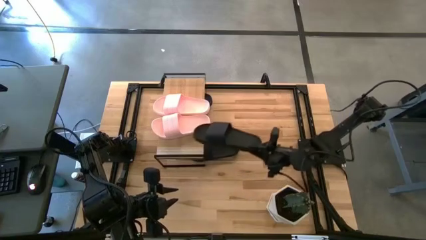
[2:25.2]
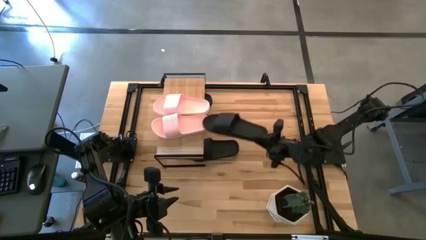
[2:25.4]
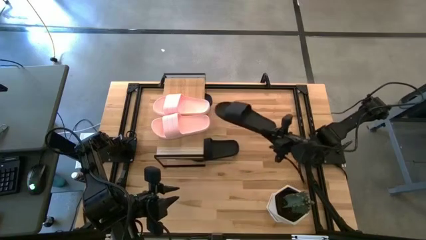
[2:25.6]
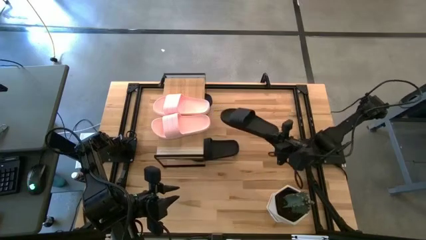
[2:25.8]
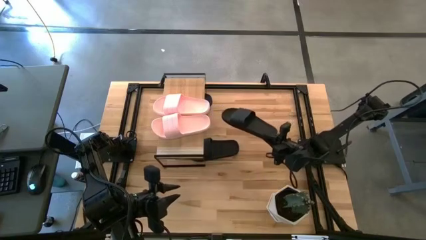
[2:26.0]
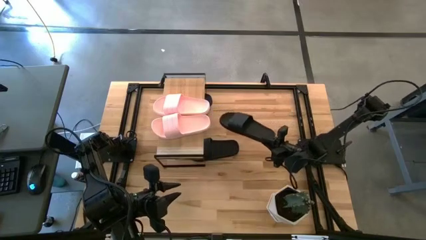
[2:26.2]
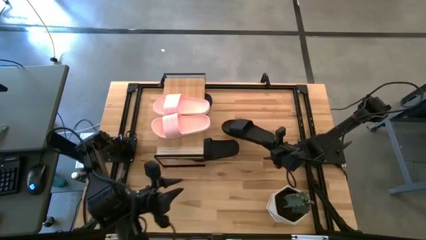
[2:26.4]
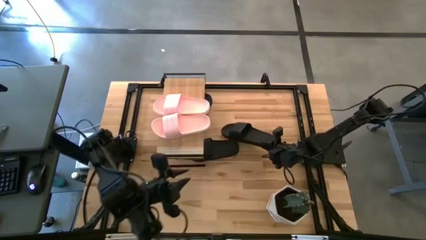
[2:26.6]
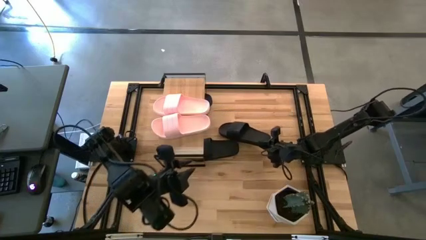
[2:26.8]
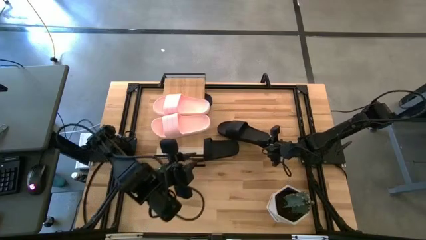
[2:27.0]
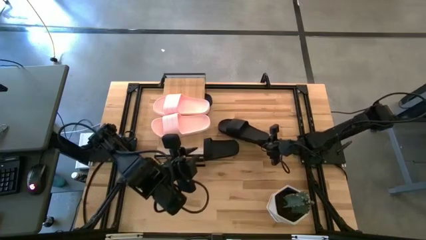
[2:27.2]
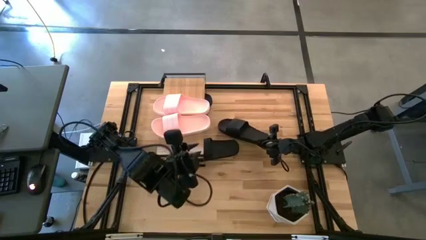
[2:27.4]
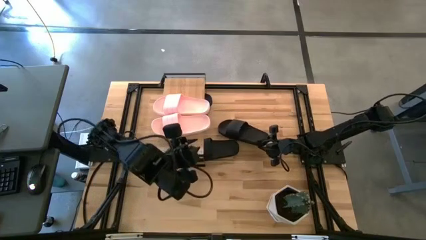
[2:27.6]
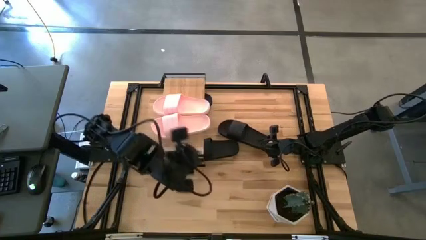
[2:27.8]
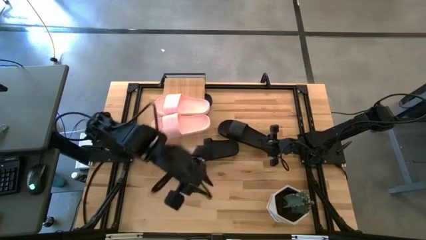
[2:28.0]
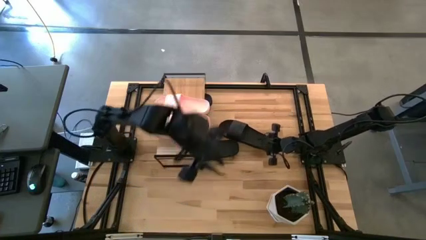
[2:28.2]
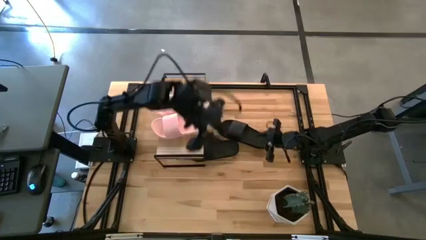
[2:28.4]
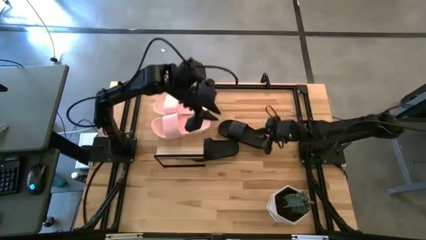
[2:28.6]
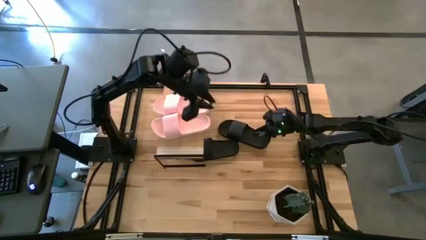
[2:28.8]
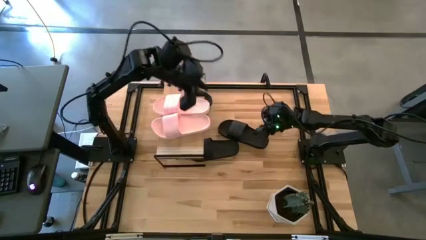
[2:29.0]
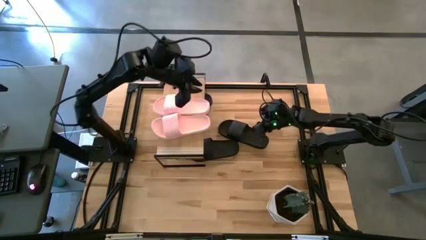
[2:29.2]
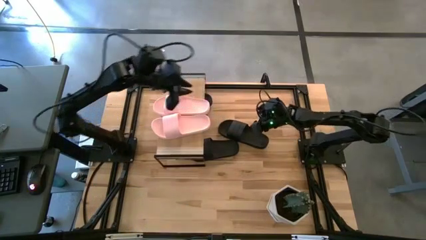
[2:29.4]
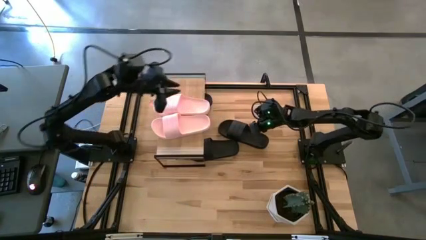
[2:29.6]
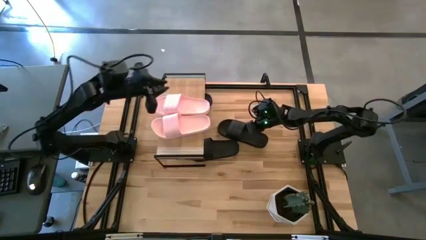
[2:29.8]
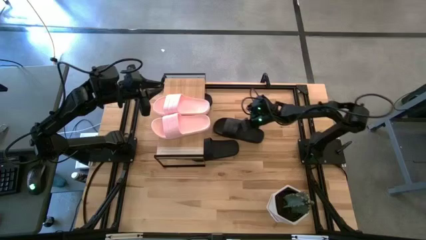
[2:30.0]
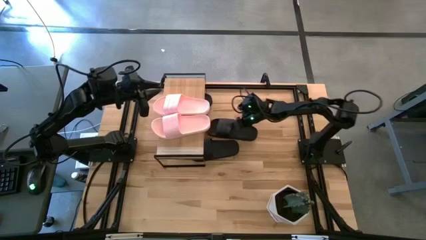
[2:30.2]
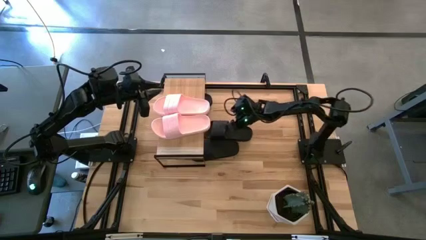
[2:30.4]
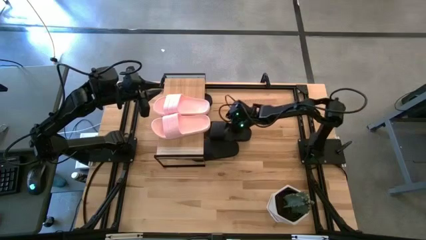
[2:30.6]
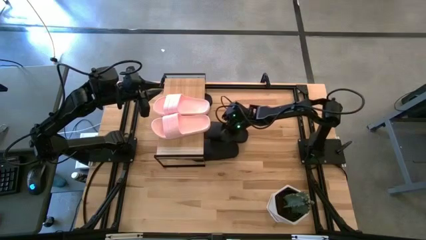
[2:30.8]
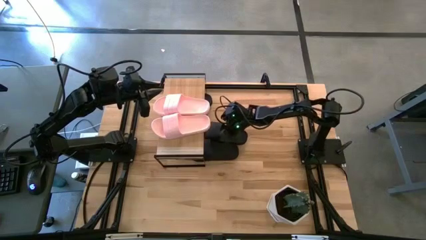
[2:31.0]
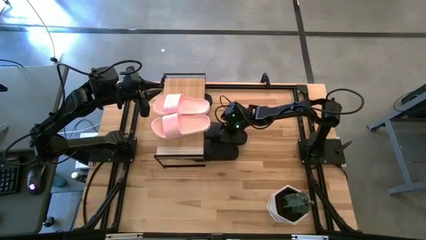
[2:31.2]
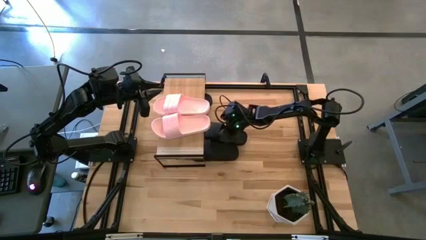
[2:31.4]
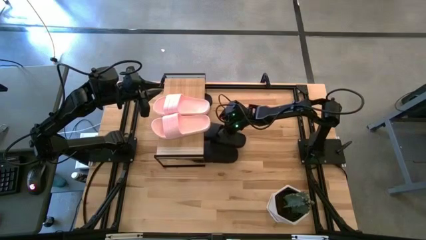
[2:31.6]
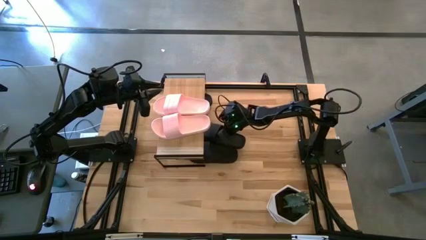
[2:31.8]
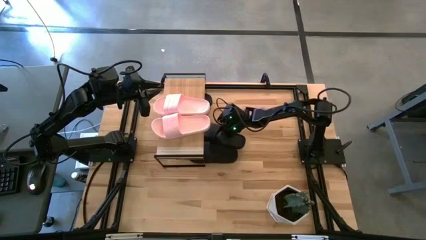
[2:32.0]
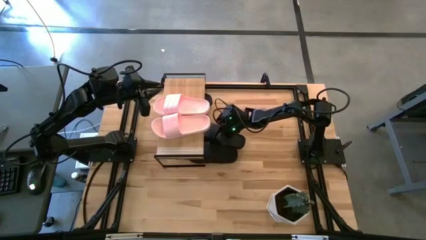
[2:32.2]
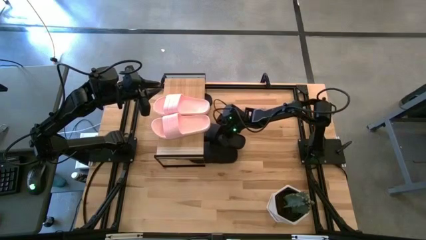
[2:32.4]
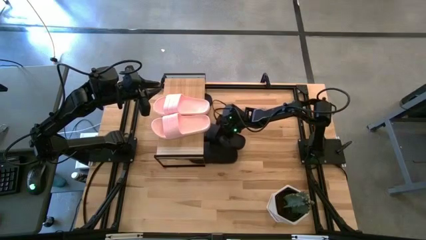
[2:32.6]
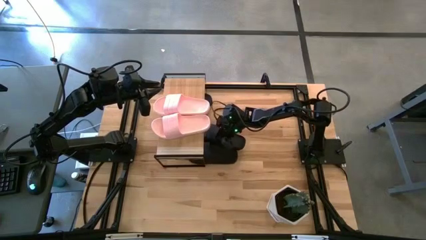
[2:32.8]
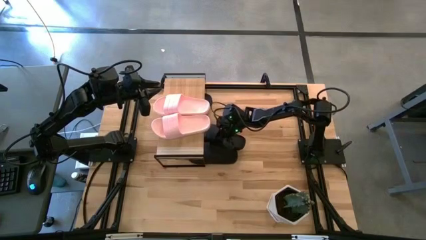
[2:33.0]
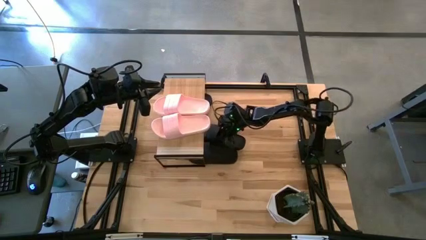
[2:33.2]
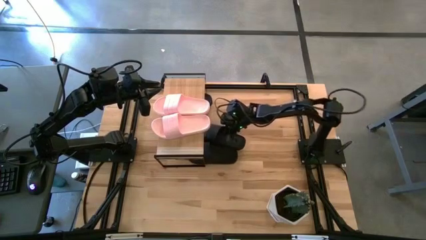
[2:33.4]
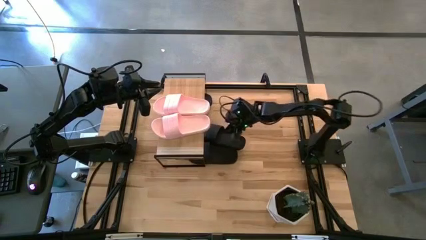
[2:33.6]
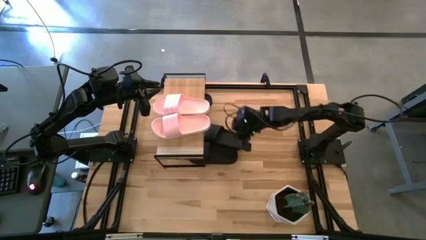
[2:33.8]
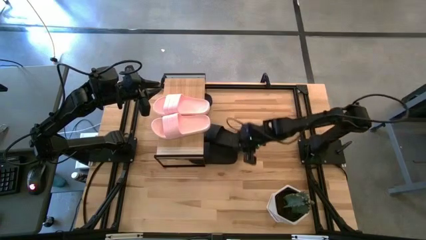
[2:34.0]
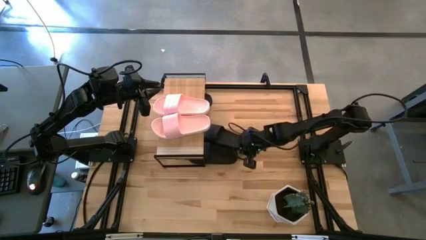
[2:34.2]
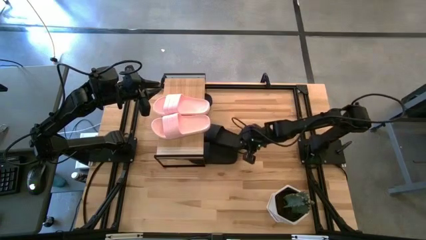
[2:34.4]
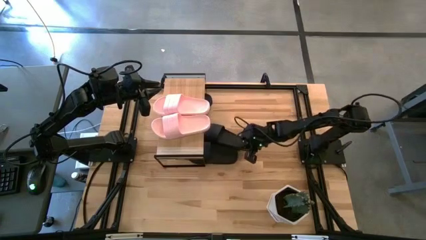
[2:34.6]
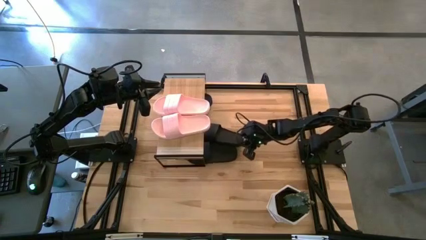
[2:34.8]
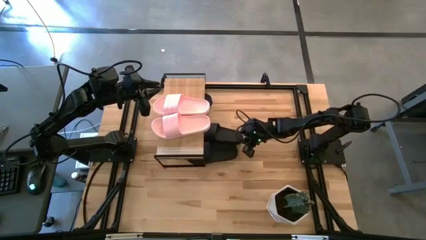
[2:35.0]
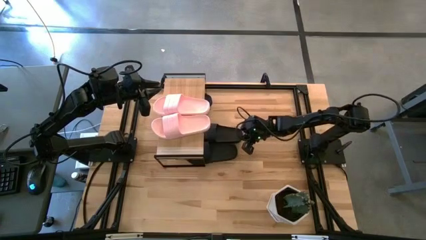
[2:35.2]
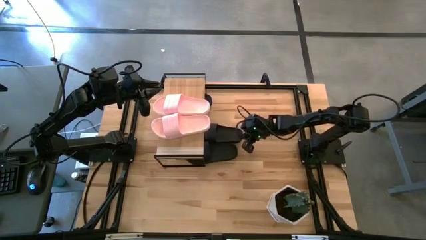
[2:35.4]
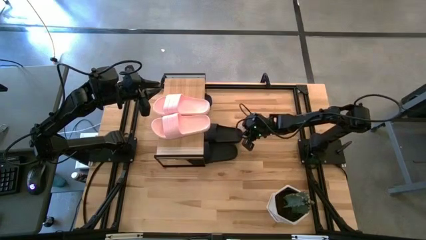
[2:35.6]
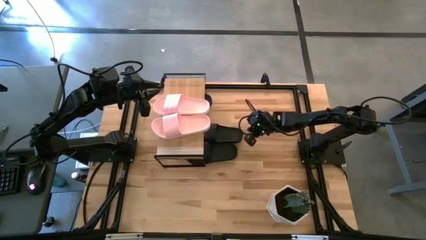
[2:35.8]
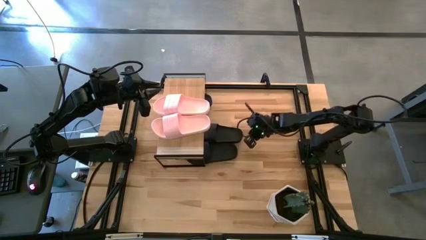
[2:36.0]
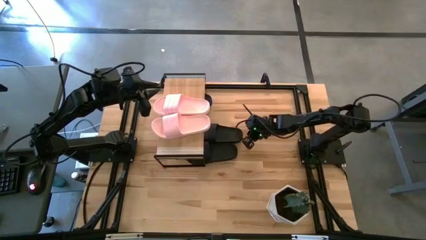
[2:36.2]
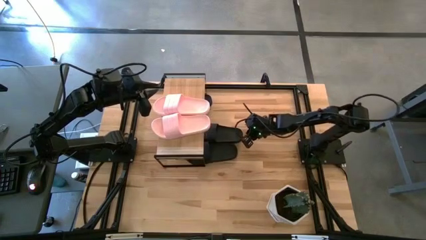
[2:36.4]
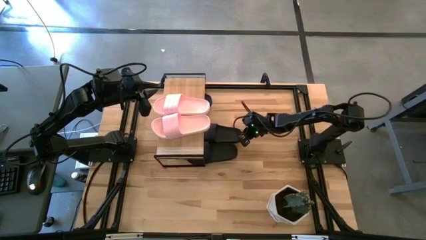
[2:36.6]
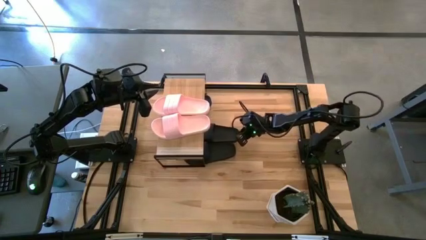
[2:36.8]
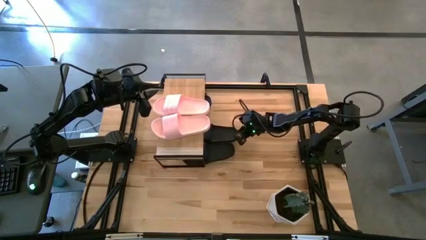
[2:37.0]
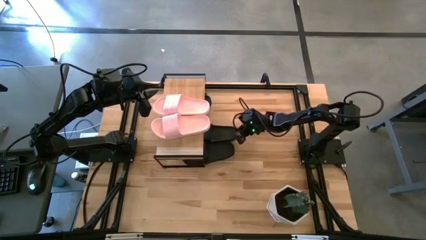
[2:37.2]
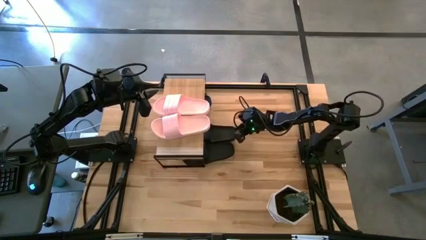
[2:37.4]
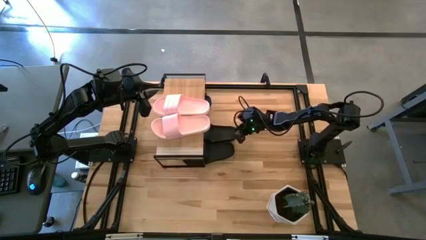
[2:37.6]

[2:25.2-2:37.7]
Task: Pick and place slides into the shelf
Put the black slide under the shelf
